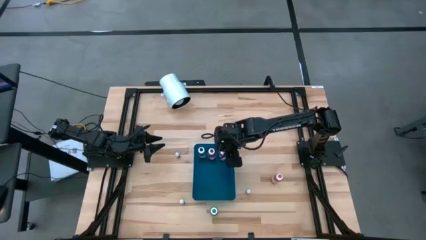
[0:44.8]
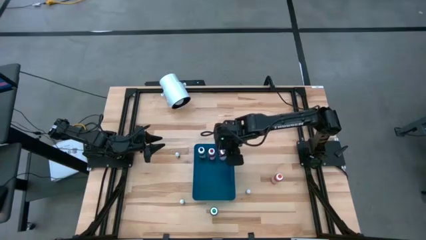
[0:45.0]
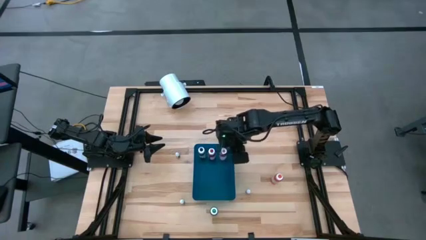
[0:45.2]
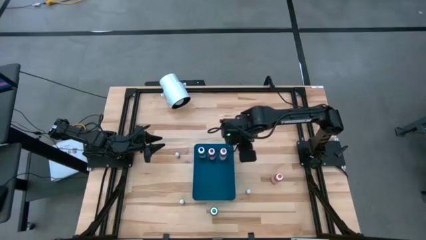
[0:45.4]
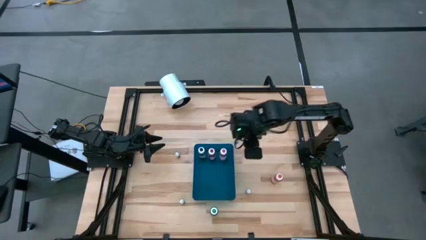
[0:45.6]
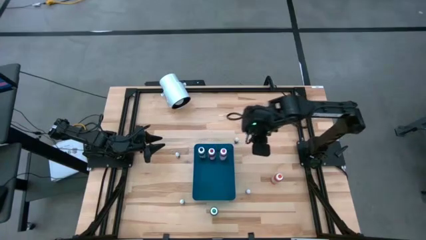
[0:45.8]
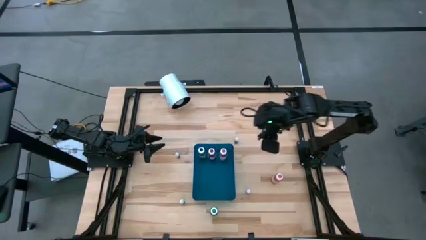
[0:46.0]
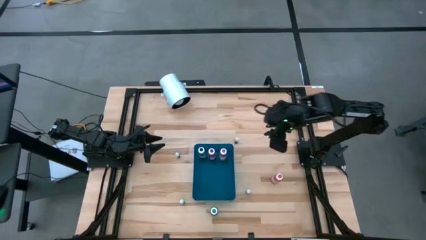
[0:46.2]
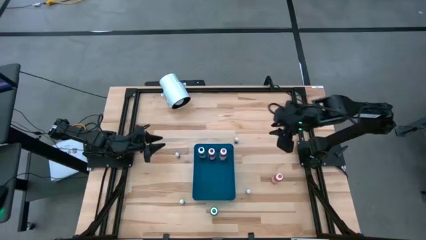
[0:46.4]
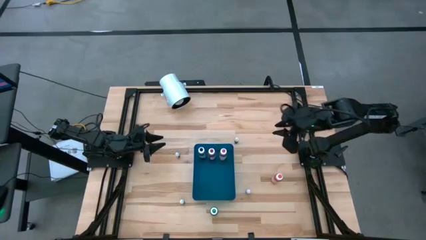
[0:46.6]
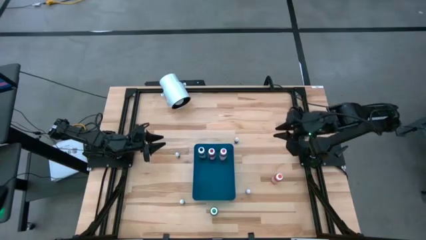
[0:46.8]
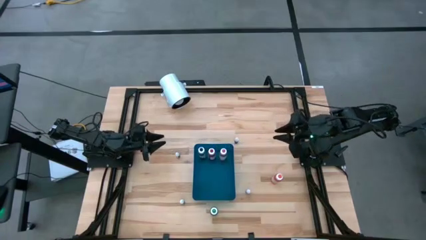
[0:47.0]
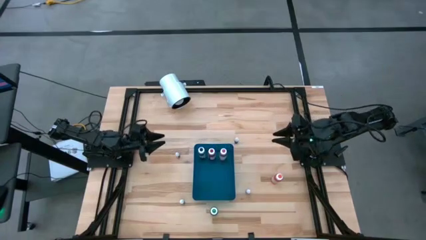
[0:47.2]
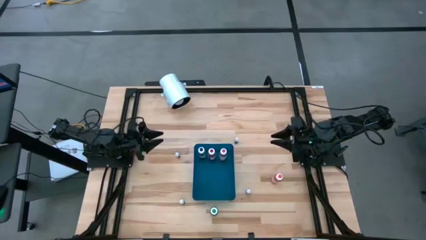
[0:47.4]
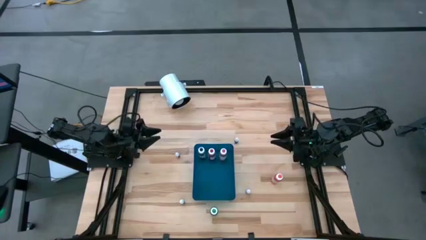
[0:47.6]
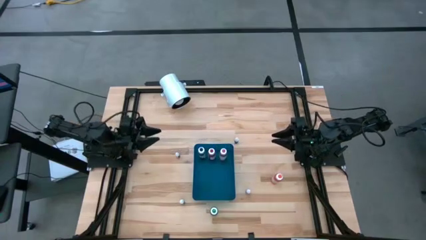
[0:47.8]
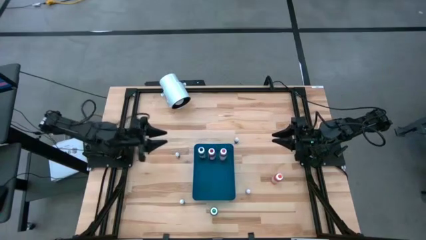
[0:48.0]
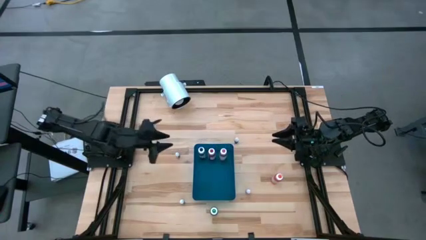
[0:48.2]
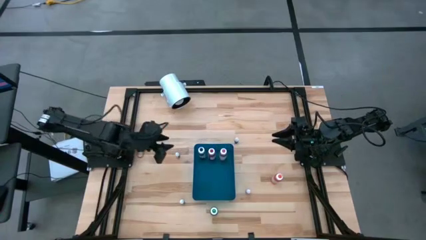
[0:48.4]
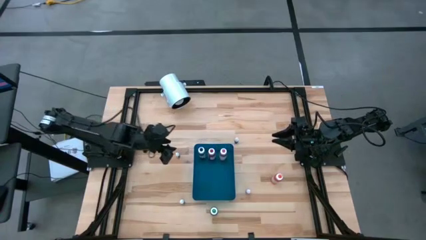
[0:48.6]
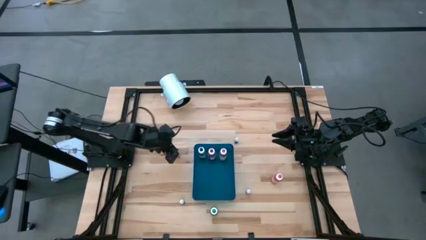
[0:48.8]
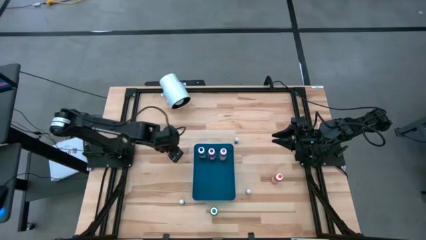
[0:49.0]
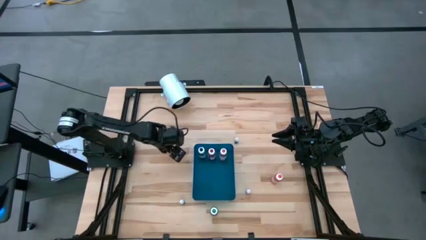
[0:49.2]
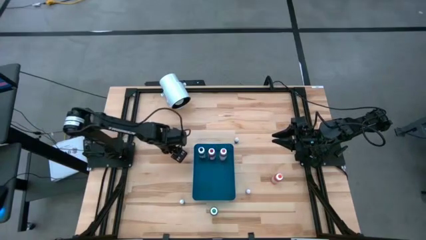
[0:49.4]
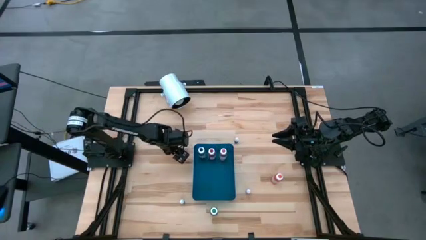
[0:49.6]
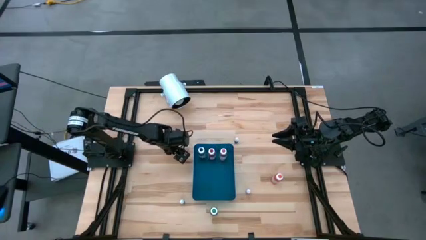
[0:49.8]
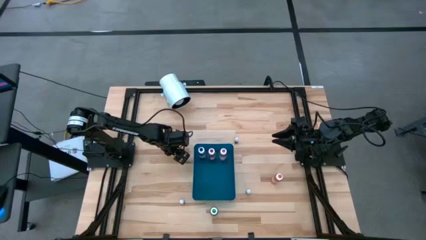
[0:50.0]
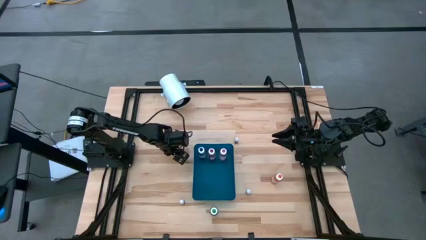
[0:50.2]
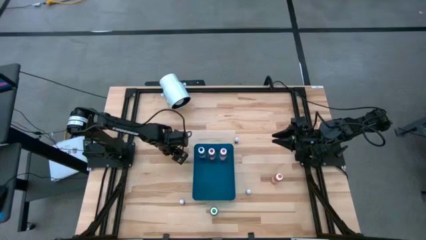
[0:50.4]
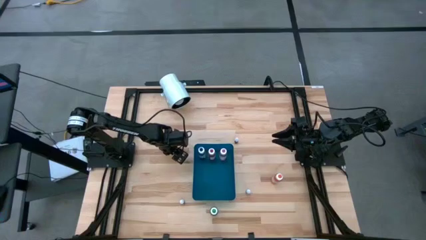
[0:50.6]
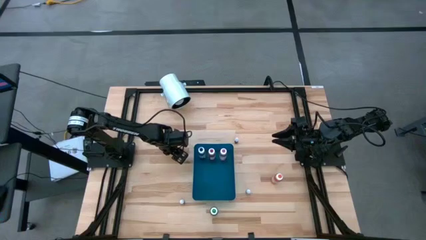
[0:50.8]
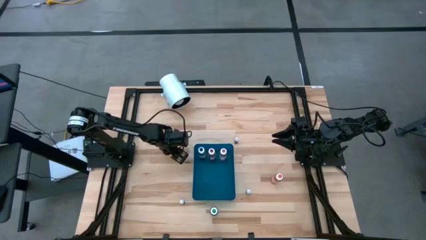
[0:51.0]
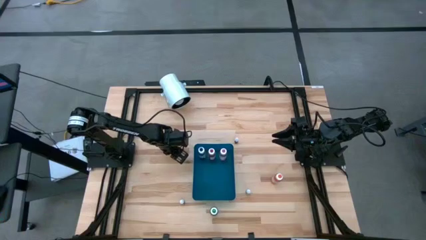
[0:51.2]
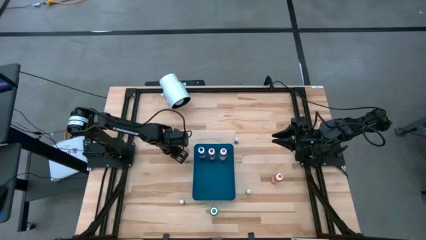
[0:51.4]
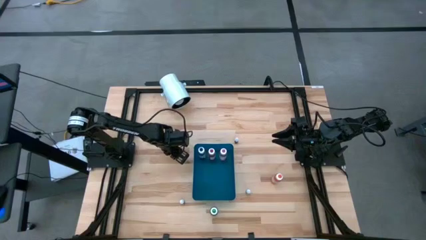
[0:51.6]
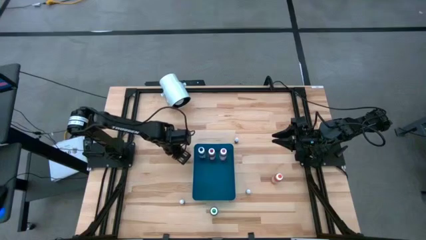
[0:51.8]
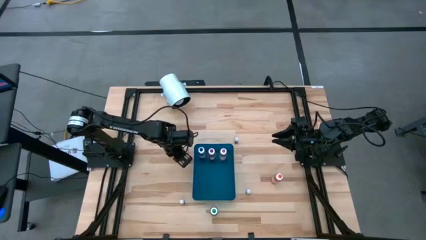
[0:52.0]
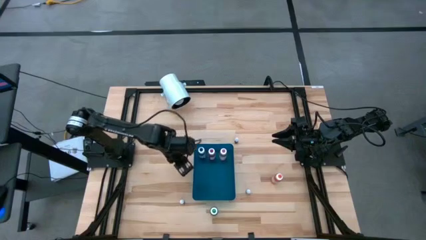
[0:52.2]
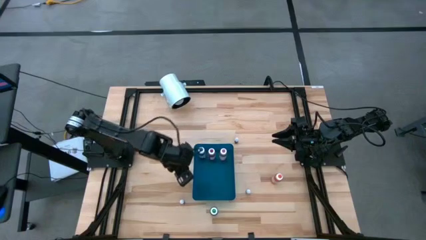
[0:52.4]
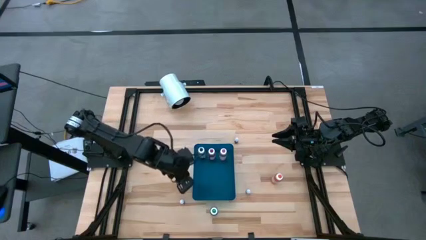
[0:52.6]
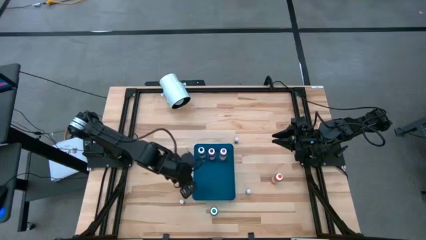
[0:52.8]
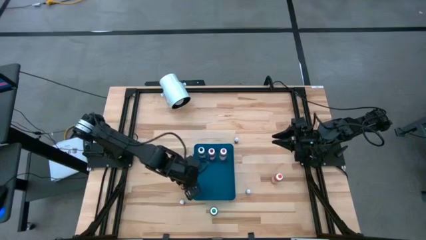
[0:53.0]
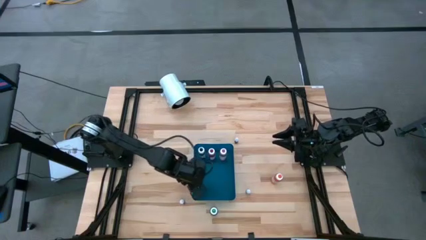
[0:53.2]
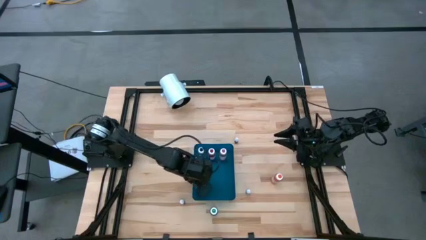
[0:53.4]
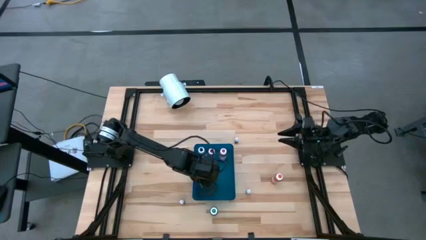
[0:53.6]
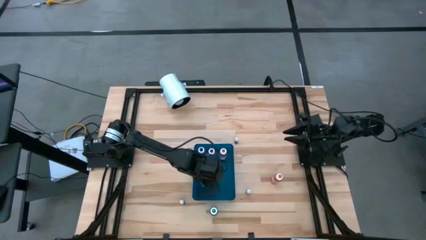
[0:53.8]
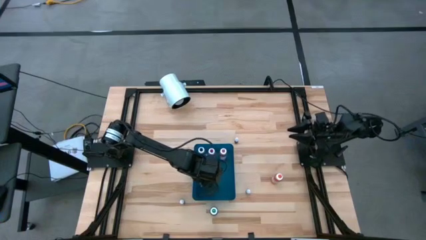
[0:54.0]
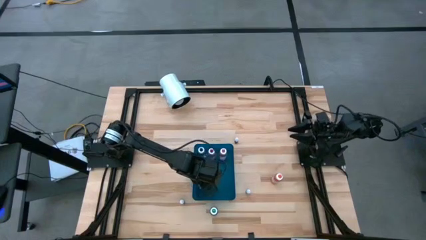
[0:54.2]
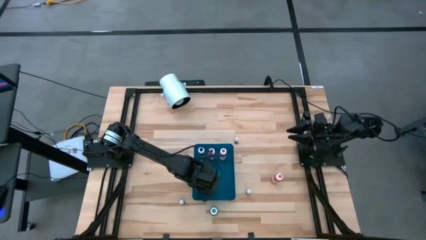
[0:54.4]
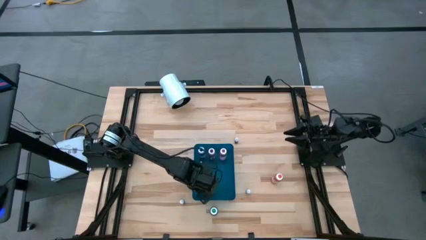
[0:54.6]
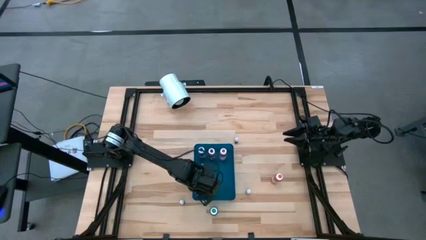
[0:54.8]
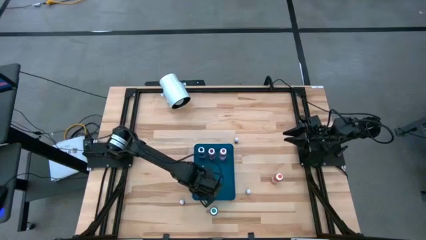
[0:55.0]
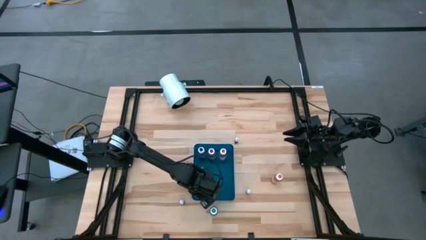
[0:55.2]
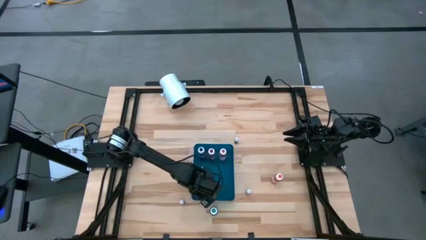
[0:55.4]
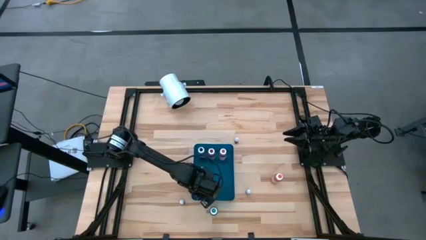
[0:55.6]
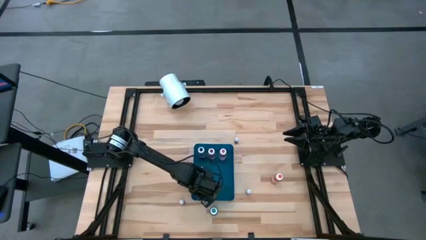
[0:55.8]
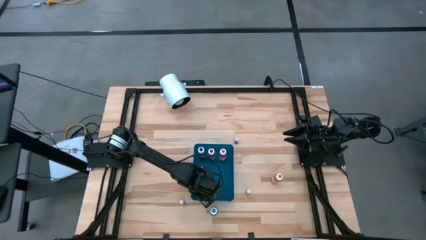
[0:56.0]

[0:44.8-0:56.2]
Task: Pick & Place food coloring
Put the small purple food coloring bottle into the blue bin
